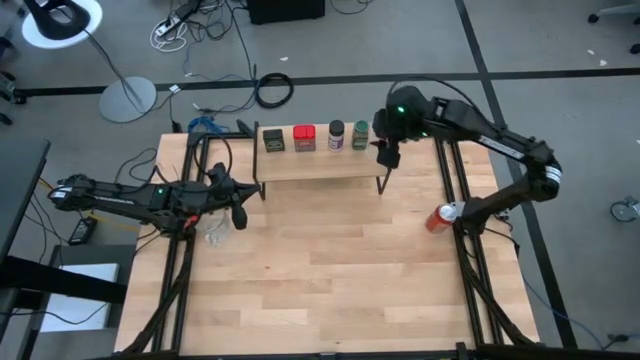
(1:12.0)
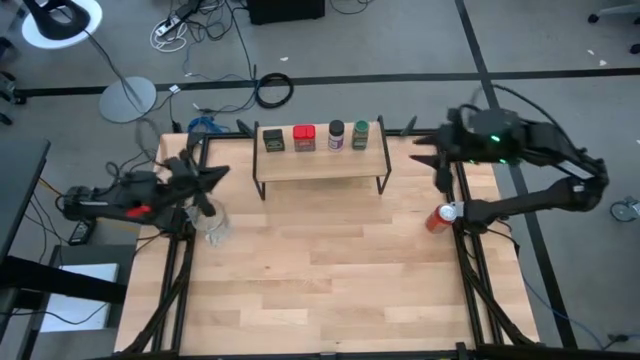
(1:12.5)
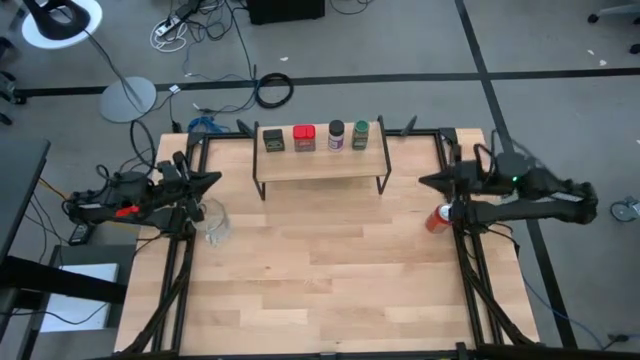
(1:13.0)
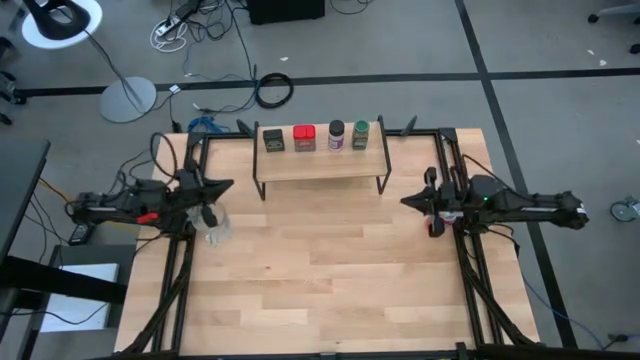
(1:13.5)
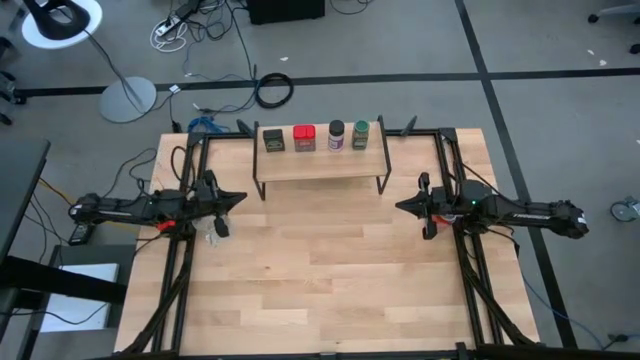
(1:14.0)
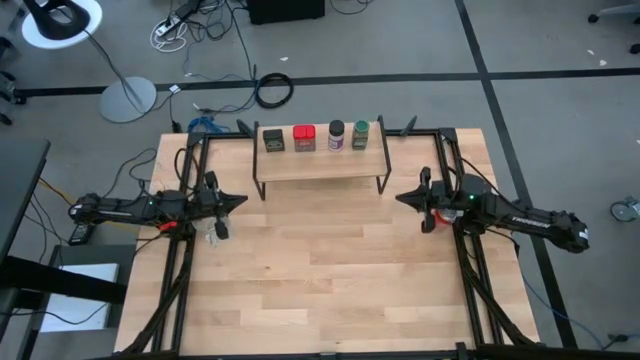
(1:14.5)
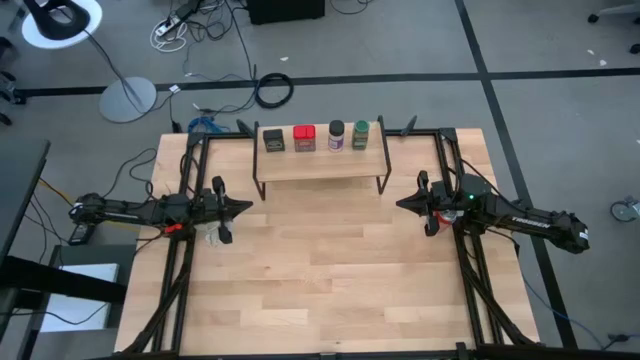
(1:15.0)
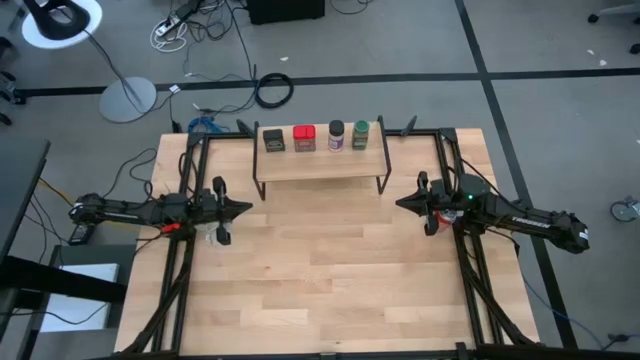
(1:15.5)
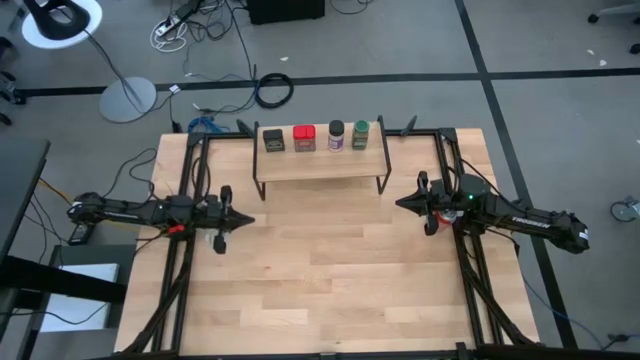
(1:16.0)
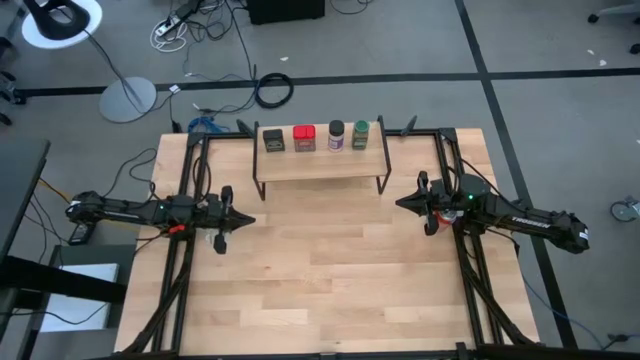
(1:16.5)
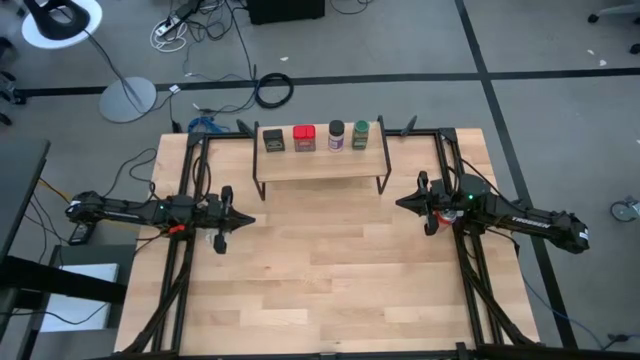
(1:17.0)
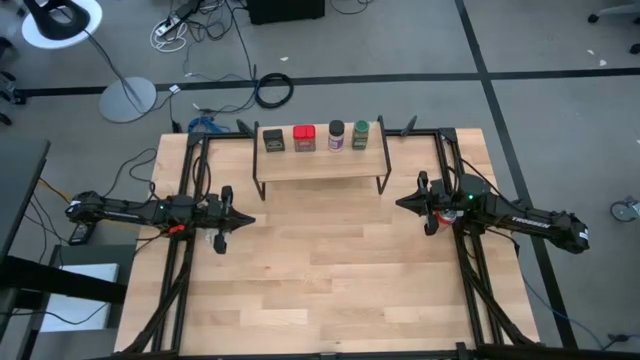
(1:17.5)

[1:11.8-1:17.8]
Task: Shelf spices
Return to Home Position

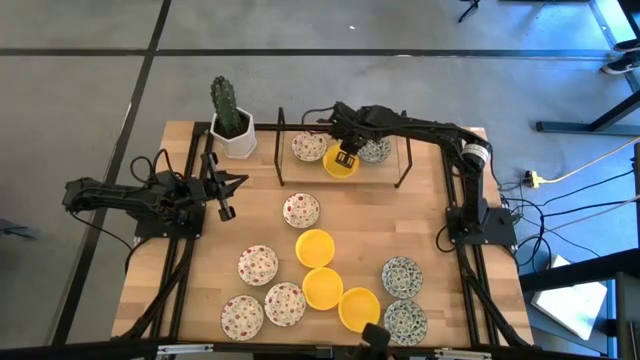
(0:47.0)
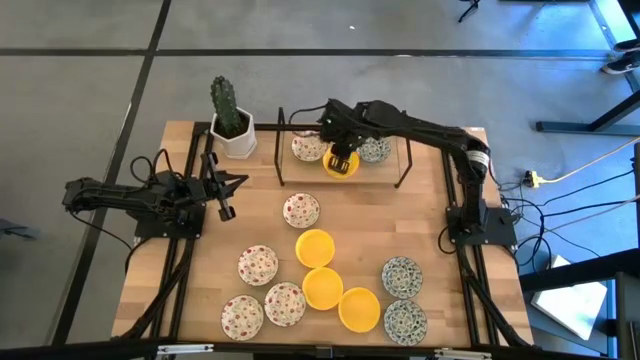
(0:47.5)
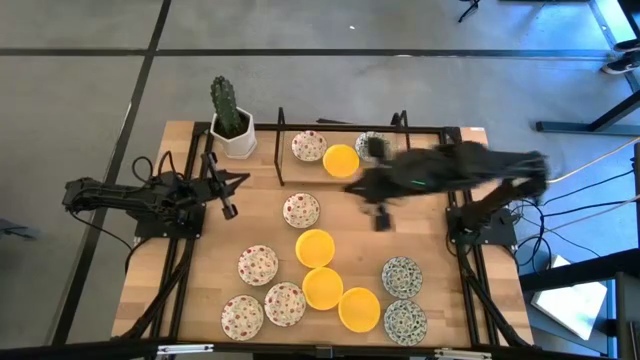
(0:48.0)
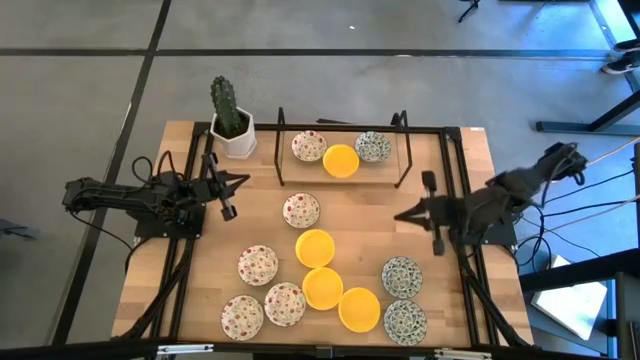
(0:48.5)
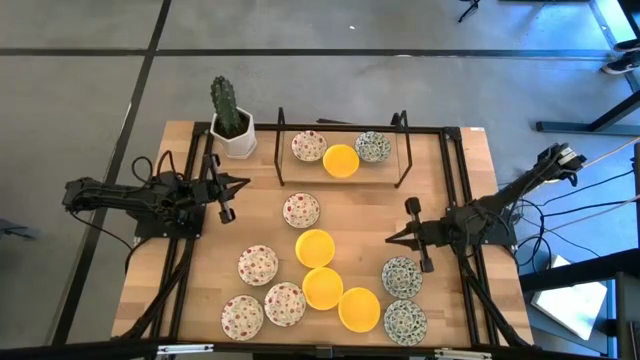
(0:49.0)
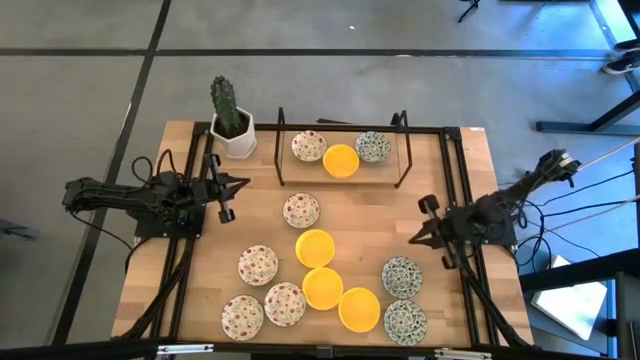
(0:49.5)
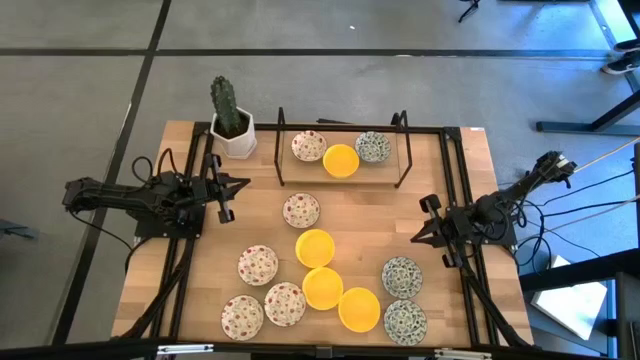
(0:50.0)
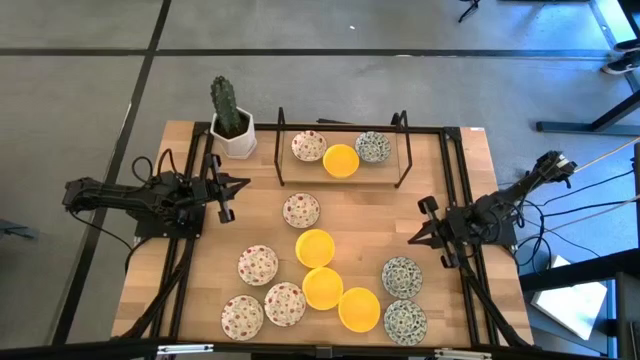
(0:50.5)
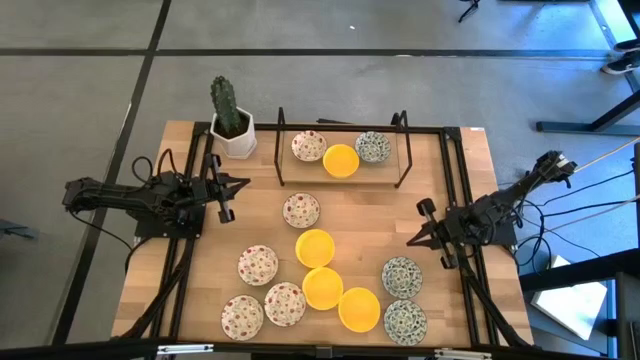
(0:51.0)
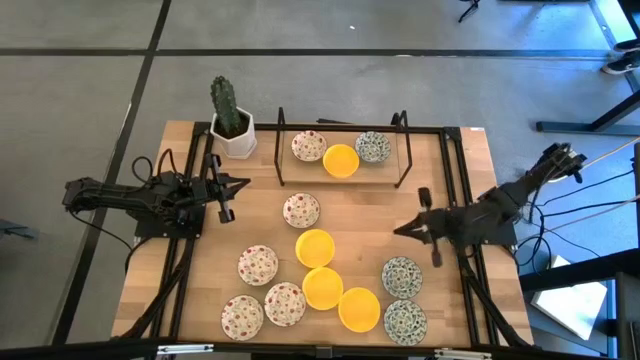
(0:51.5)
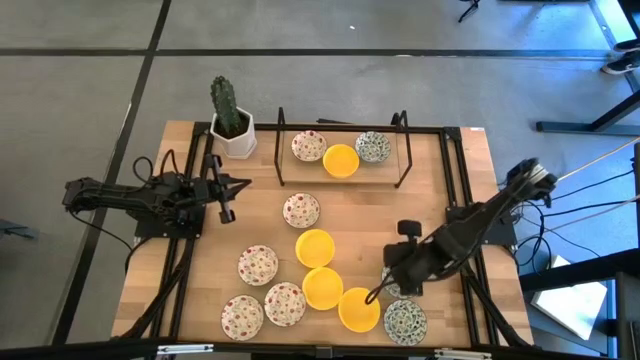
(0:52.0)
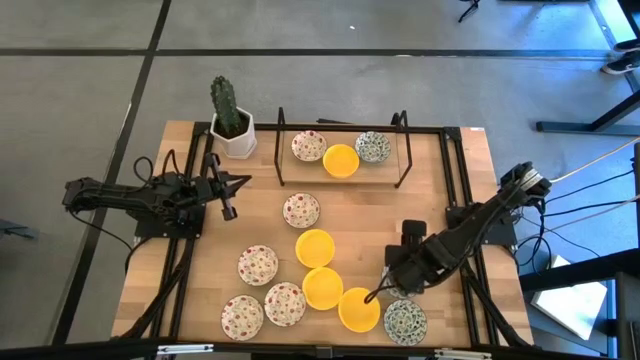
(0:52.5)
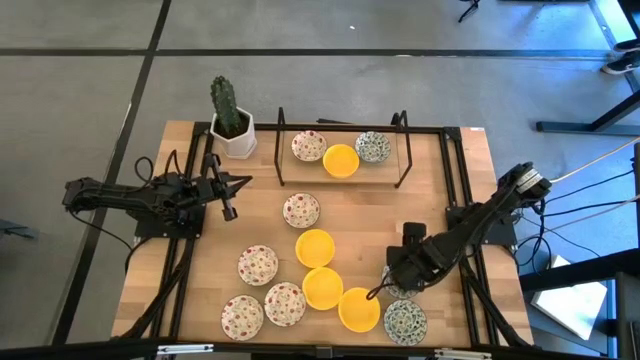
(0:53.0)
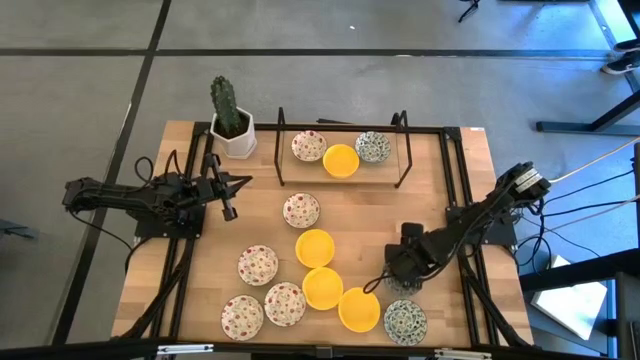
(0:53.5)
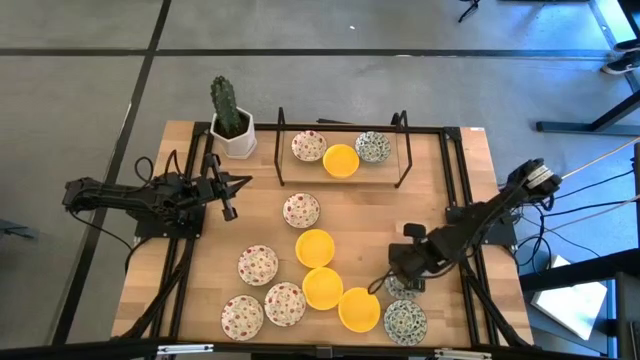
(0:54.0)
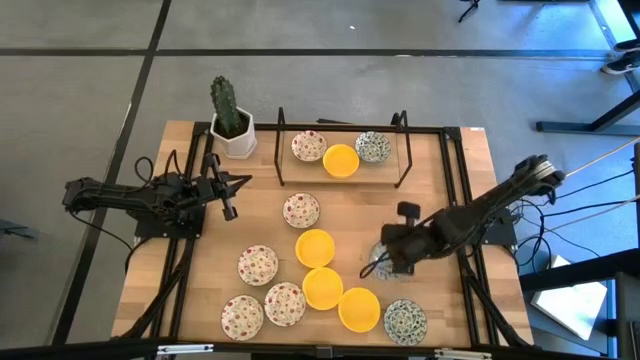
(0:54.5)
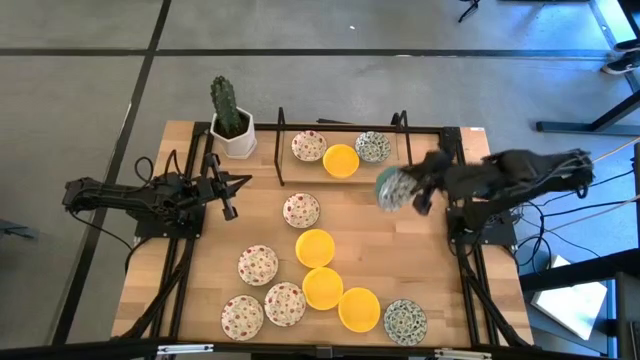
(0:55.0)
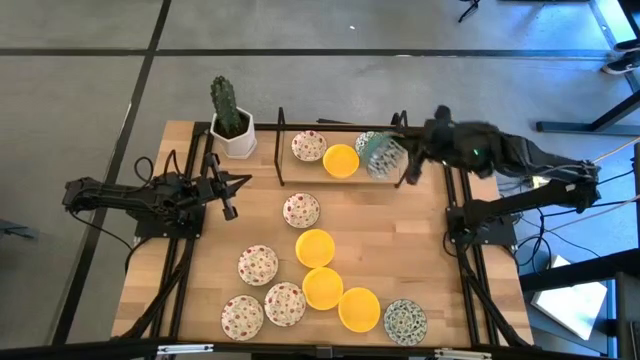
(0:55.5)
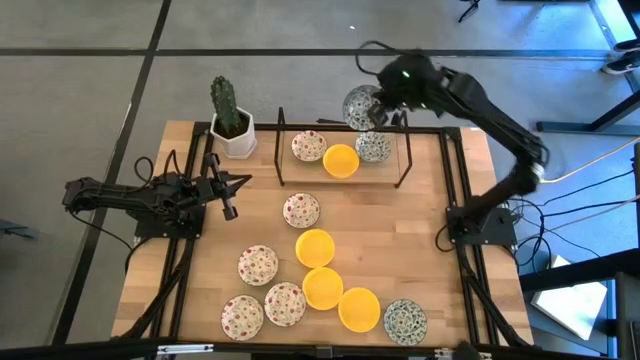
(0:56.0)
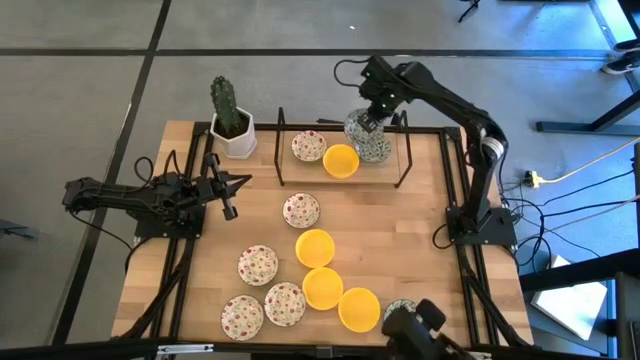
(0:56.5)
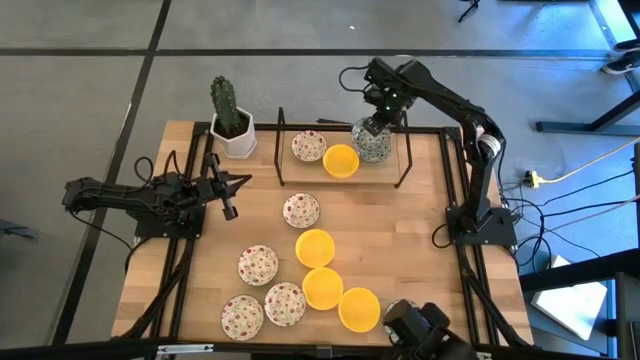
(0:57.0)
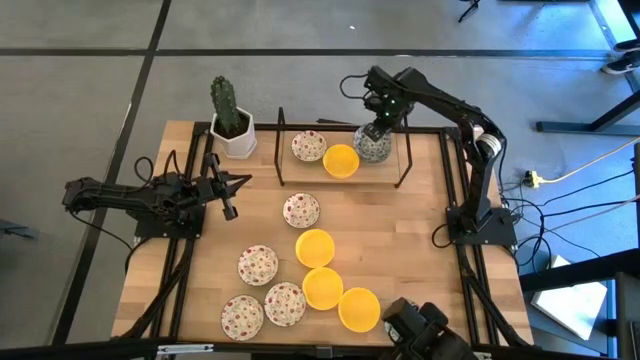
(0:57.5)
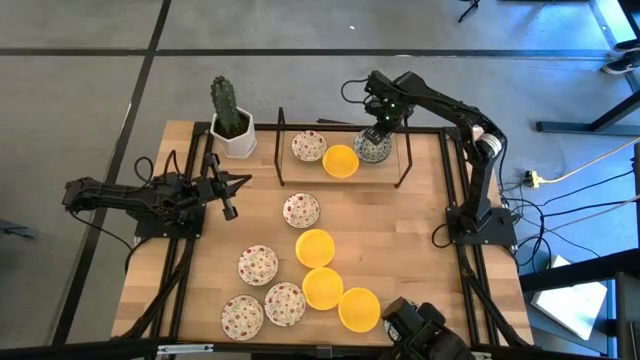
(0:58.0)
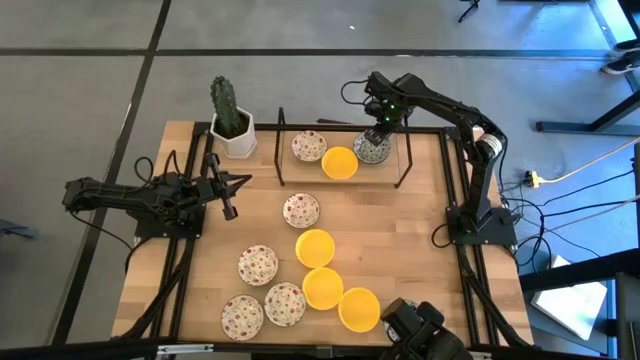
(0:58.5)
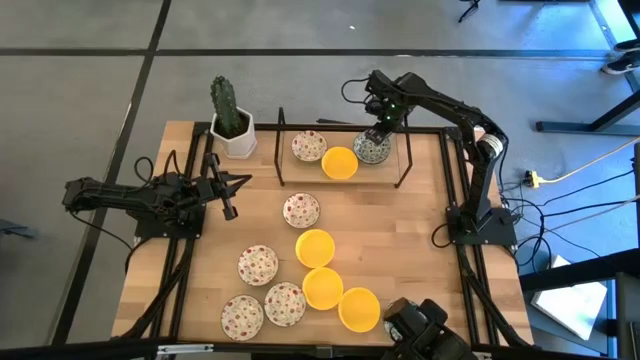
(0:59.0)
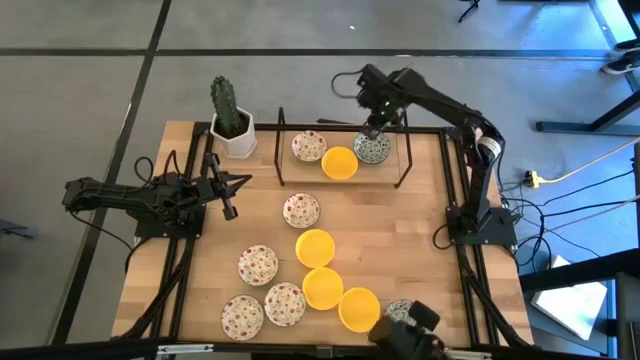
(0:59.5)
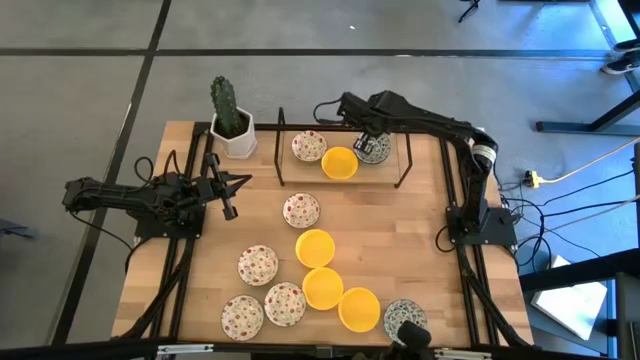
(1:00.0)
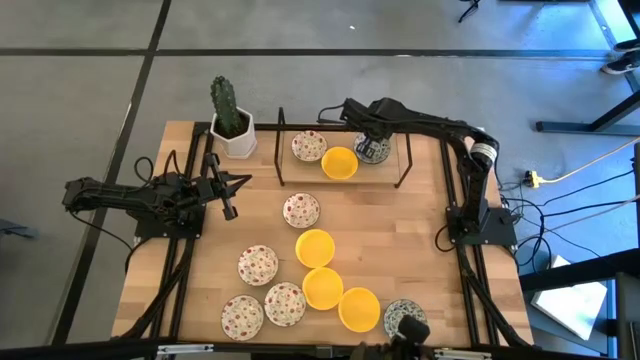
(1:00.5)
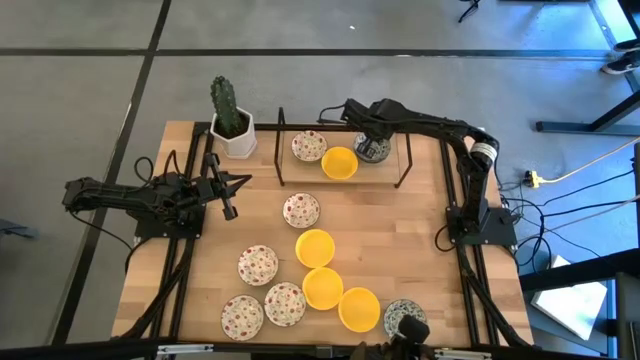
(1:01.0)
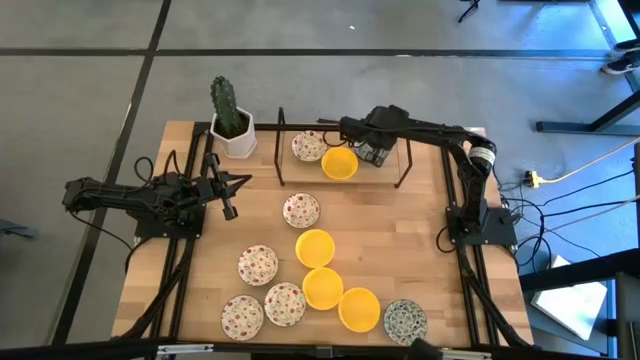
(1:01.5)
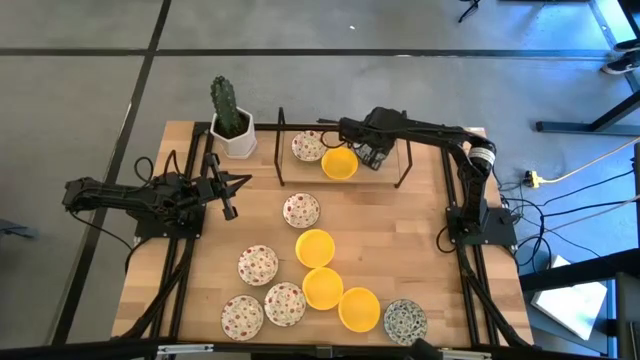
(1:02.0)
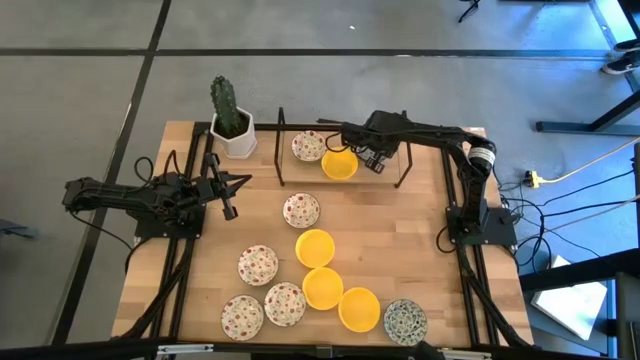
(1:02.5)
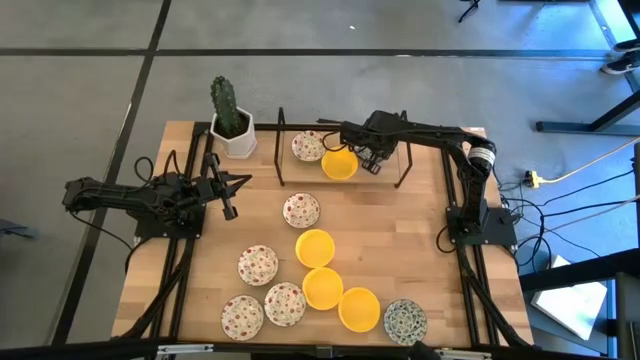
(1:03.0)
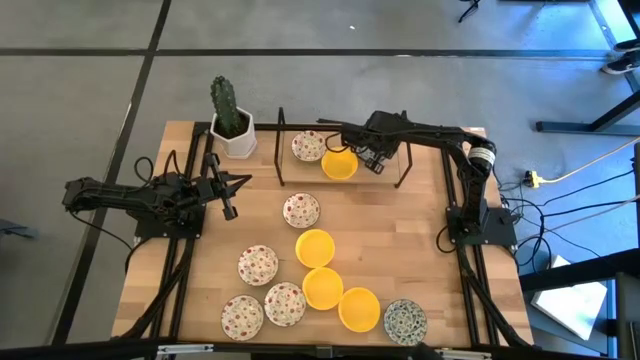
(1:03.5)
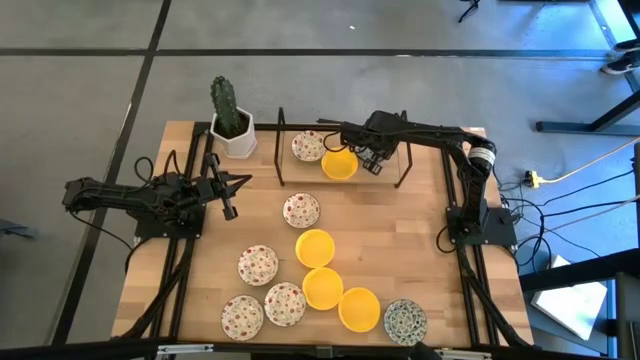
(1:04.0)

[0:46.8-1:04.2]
Task: Pick & Place Mini bowls
Stack the white blue patterned bowl on top of the white blue patterned bowl on the shelf
